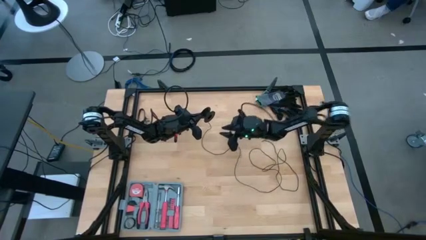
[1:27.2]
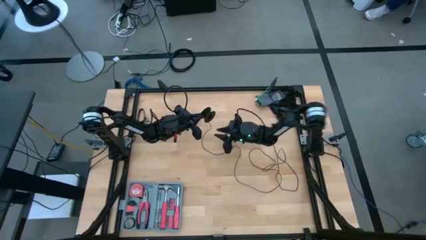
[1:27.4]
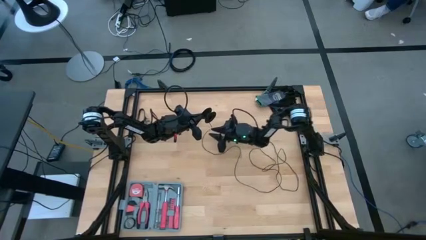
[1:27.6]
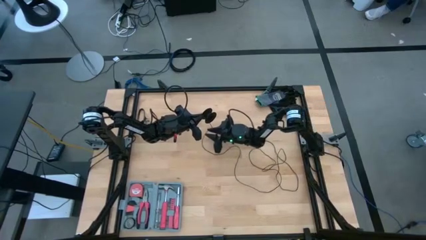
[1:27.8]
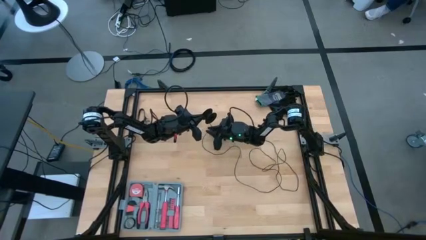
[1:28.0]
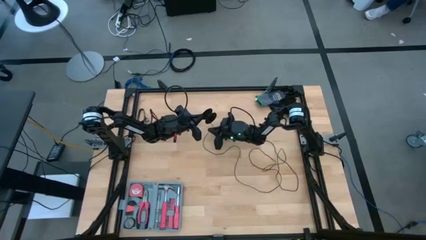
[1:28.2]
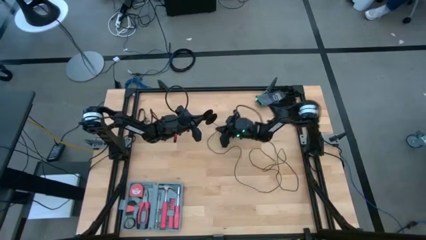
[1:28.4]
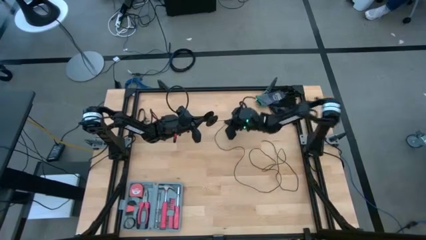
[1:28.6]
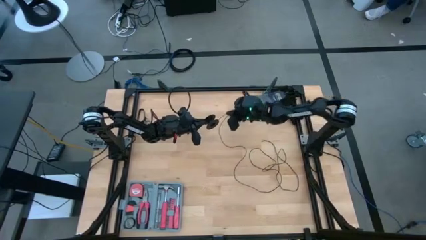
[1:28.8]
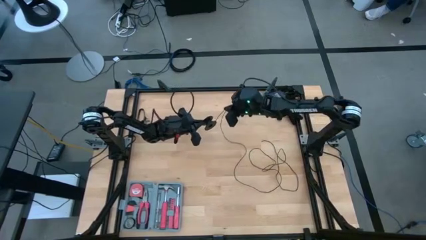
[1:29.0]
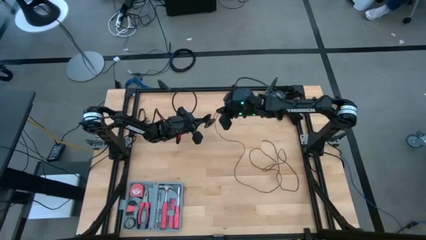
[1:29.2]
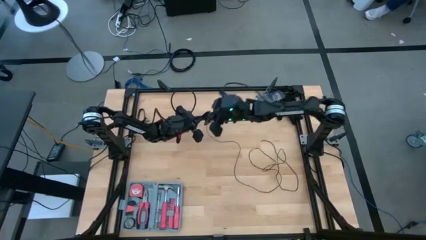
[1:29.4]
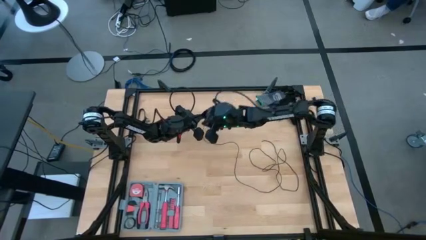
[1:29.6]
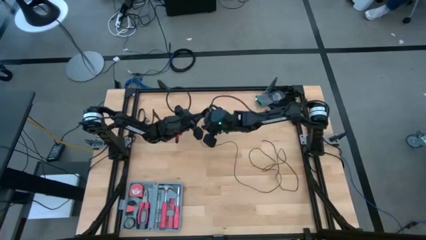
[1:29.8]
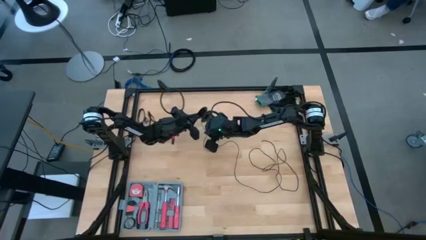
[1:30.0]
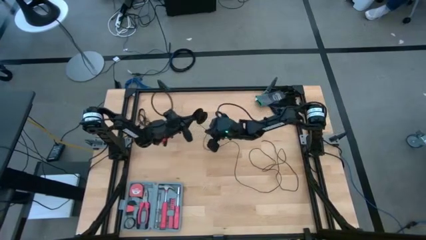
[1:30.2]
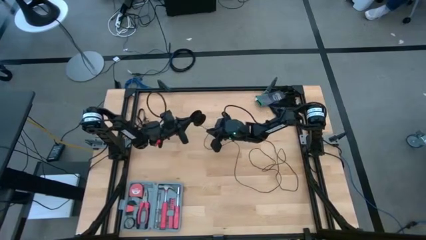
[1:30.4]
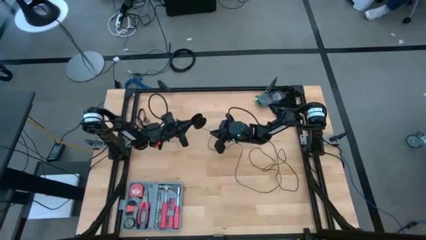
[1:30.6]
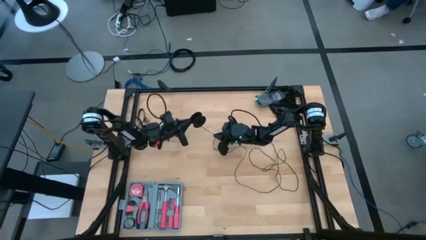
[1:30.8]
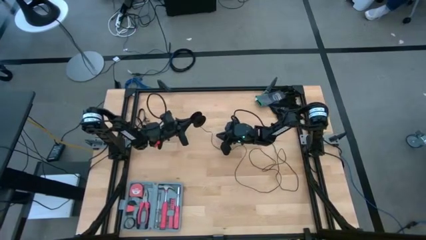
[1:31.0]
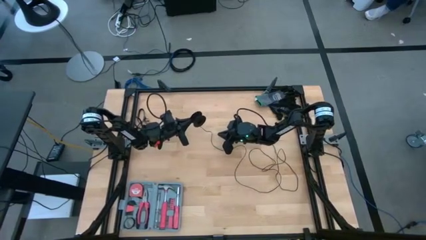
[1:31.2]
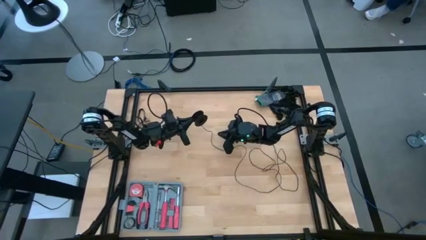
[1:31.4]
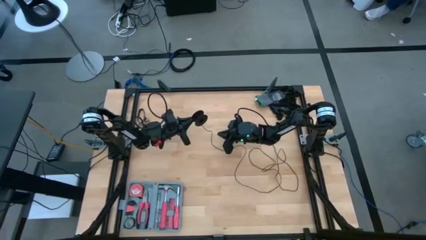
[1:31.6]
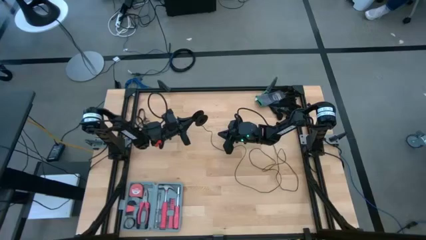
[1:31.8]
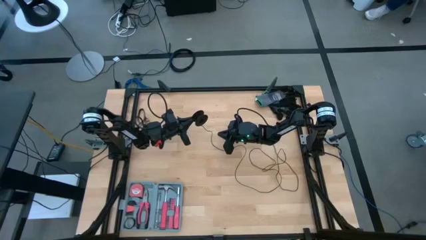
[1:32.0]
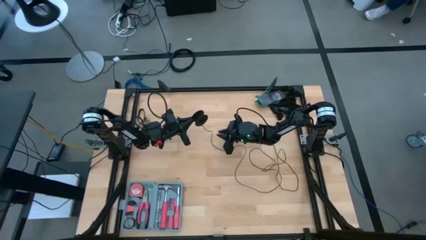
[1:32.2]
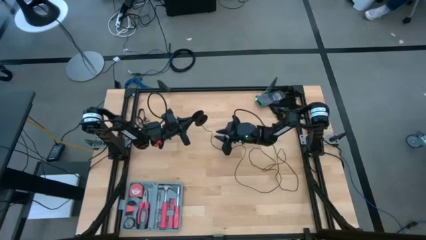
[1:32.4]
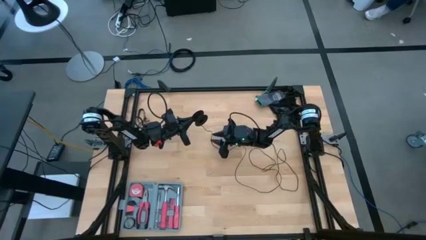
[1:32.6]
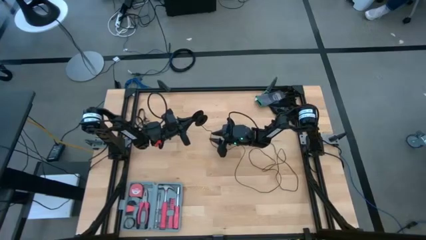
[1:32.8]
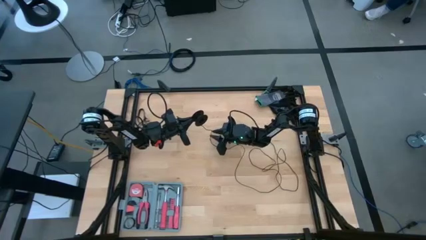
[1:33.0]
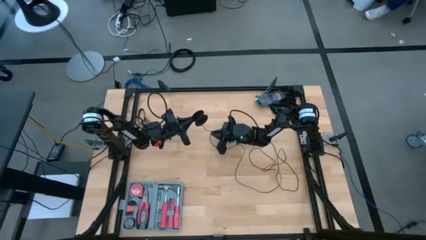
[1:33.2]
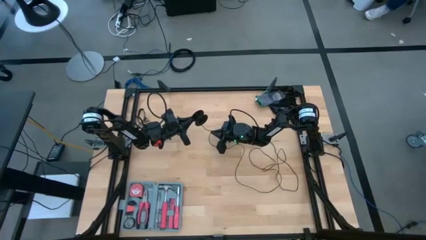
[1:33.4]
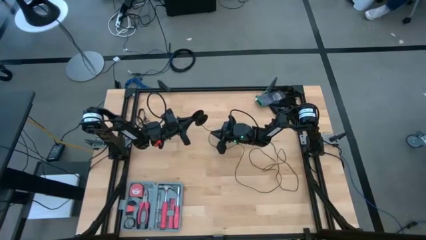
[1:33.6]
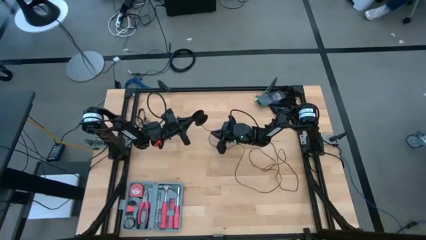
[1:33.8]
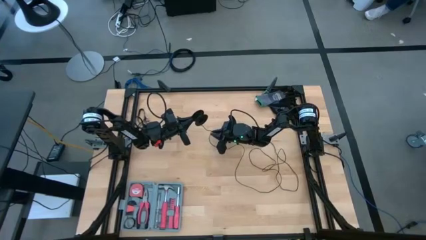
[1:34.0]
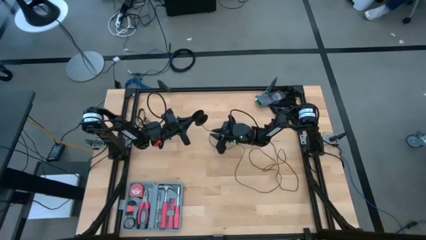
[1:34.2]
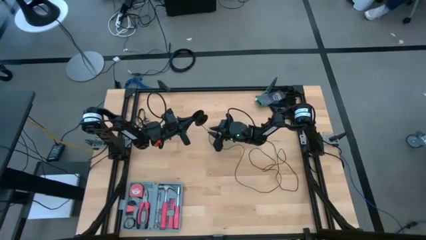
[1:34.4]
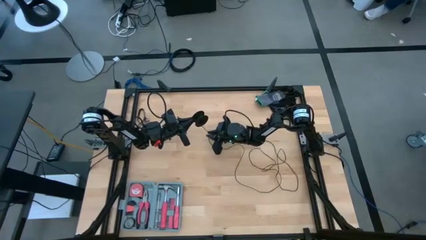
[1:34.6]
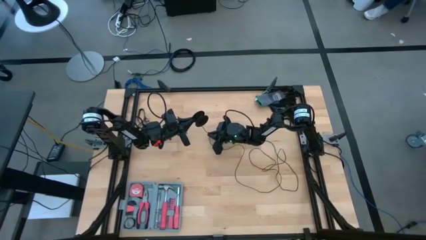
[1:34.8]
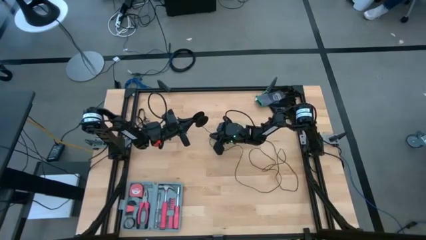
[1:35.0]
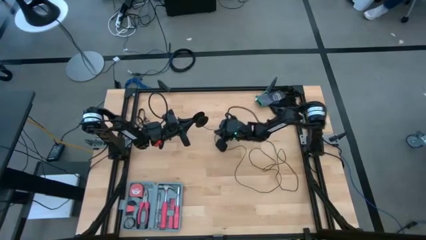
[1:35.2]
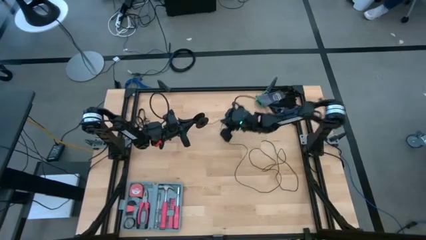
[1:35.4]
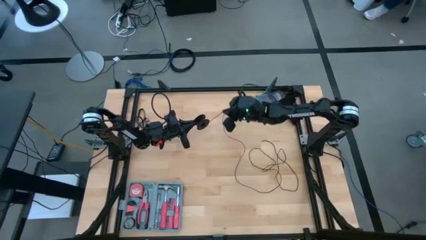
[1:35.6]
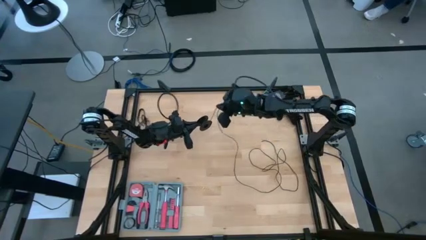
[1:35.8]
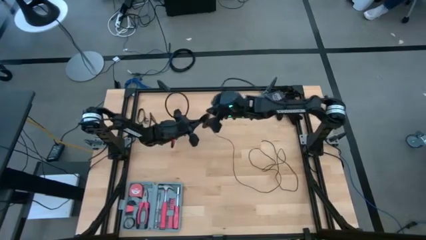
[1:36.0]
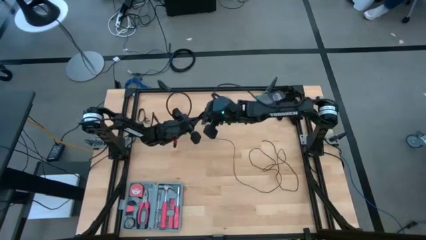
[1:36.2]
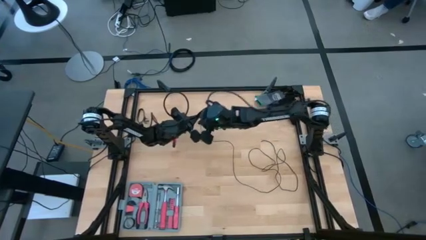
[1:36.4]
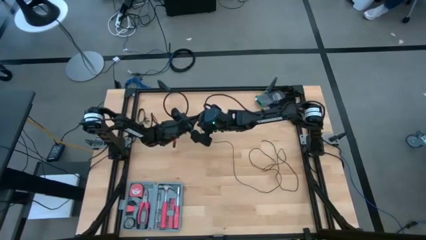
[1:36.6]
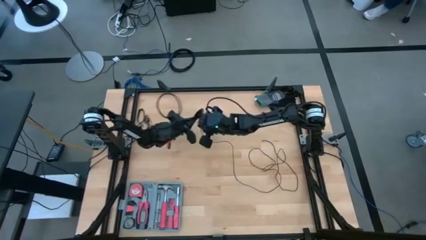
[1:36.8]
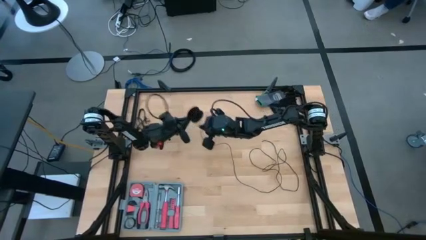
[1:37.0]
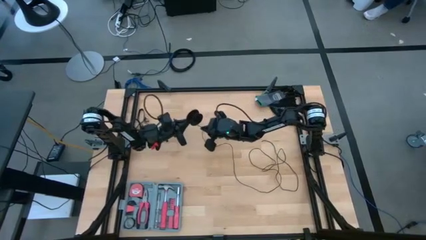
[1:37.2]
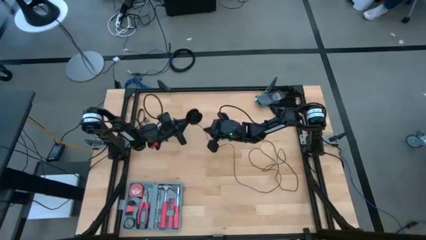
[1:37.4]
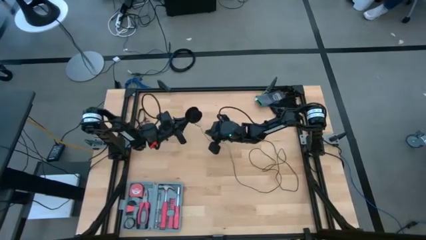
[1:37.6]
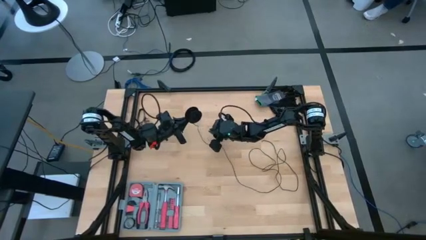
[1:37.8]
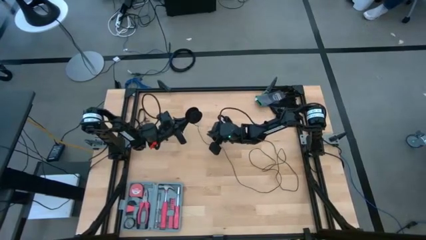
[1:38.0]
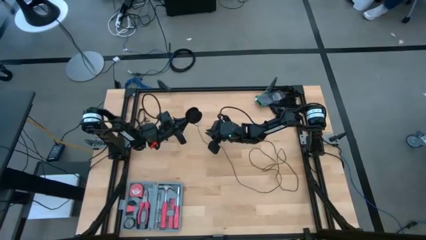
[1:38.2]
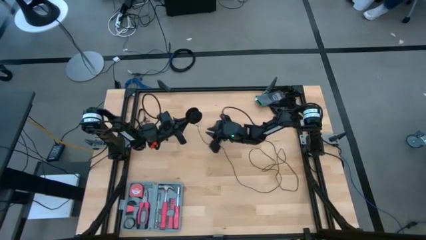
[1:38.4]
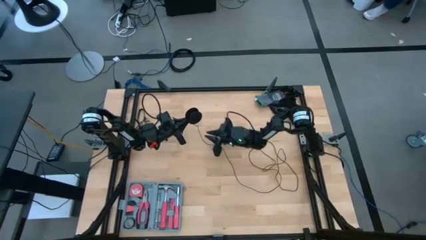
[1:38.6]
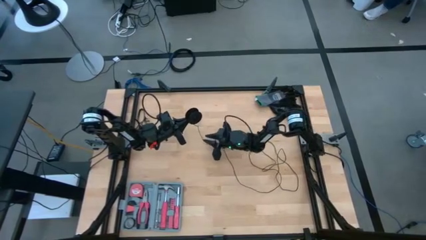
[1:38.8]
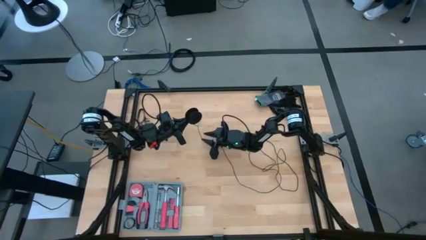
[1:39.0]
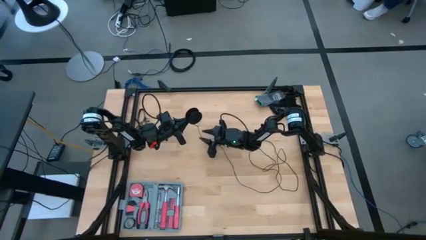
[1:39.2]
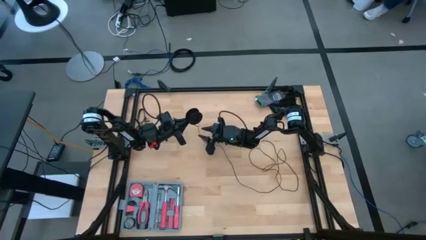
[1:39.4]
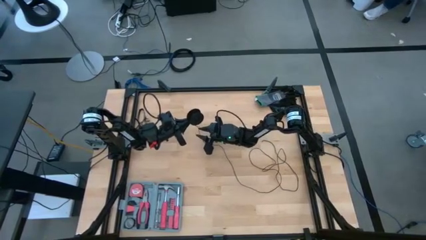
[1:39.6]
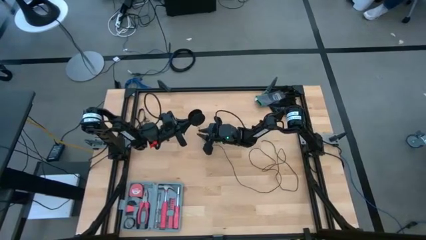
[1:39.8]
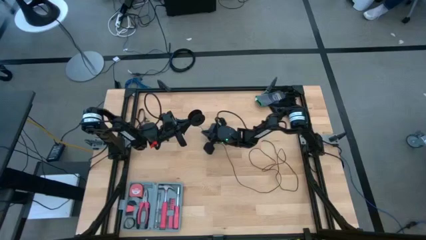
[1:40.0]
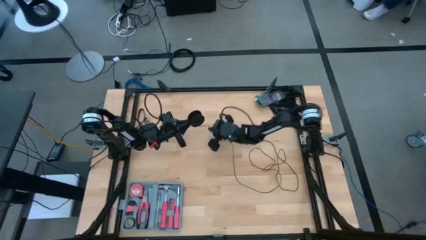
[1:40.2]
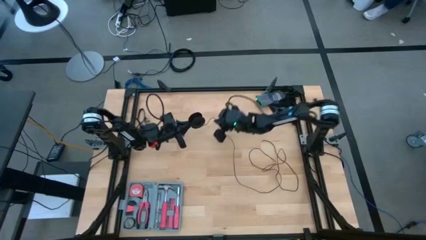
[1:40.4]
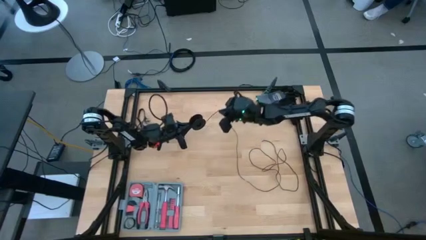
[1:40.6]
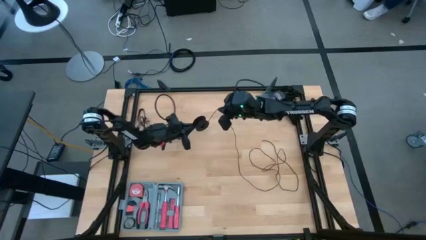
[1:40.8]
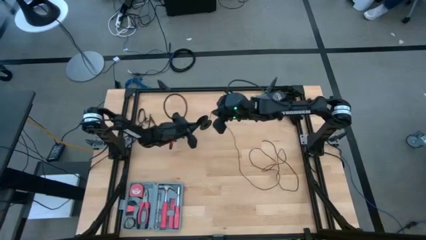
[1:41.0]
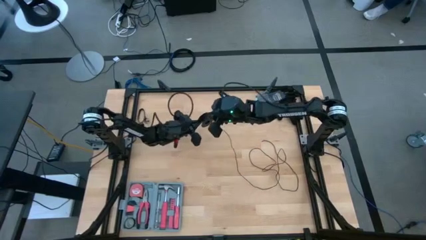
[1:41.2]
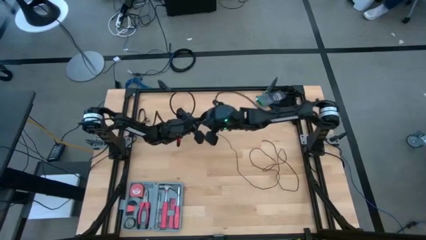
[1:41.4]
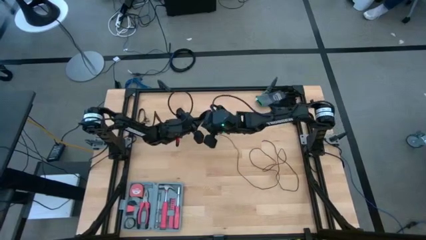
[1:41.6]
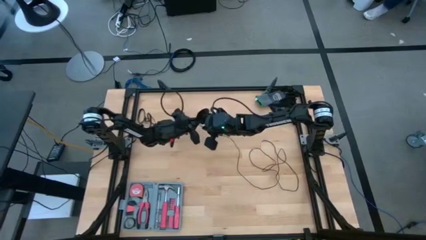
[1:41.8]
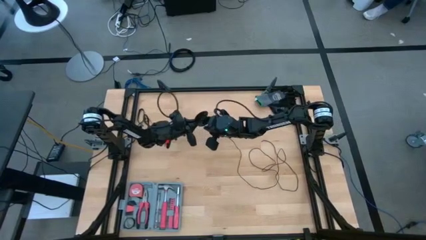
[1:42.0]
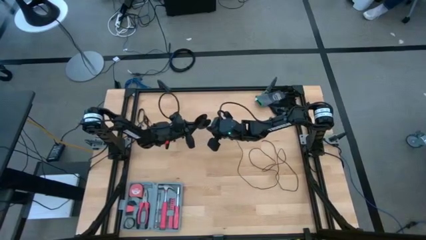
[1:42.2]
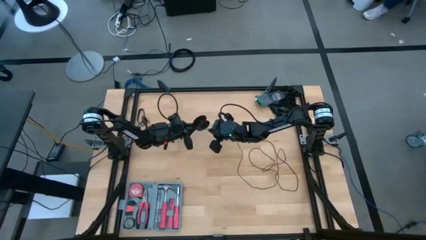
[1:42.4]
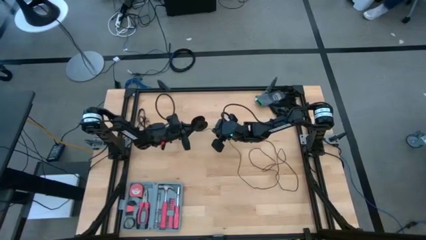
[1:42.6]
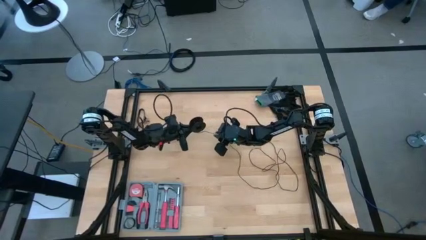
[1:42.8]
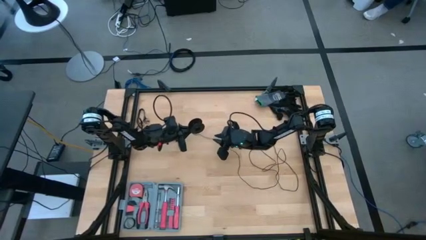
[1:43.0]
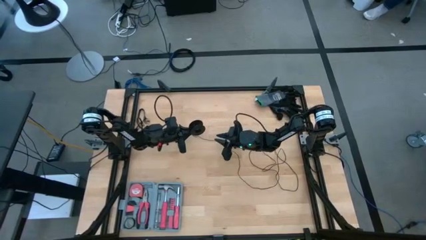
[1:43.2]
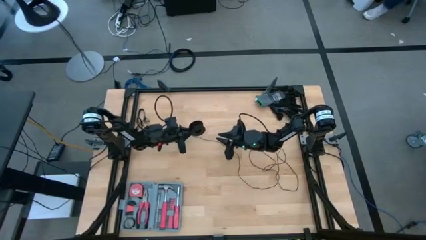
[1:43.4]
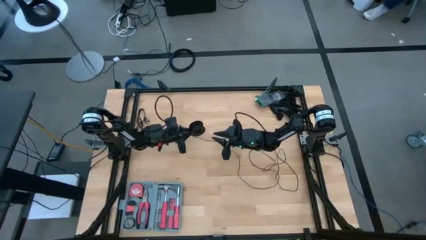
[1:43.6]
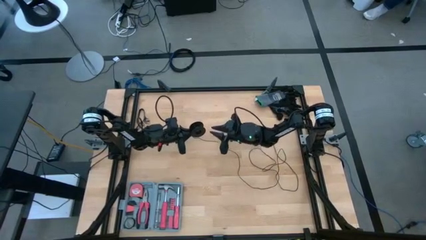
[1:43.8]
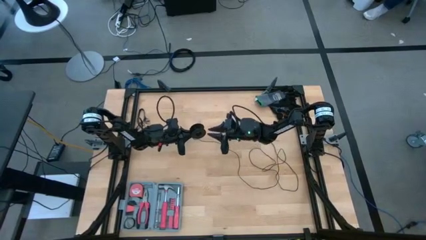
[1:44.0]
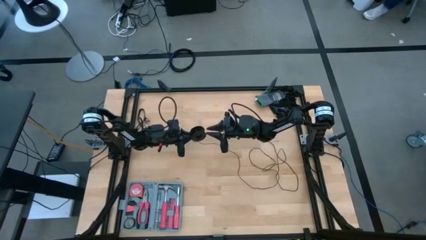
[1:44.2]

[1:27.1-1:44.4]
Task: Coil cords
Coil the black wire on the spool
